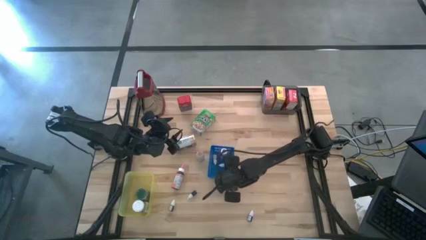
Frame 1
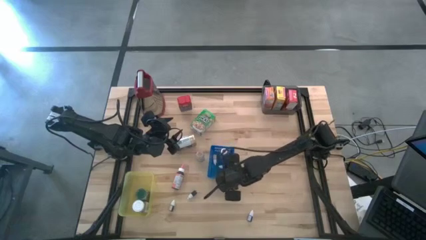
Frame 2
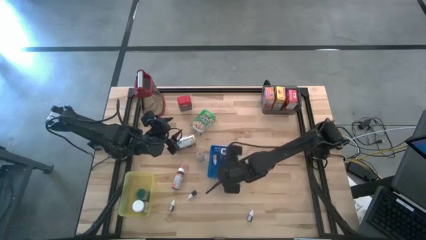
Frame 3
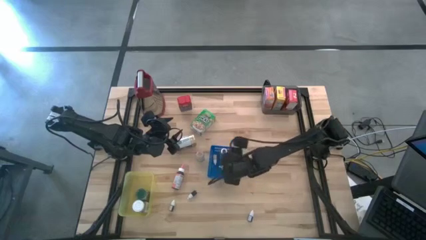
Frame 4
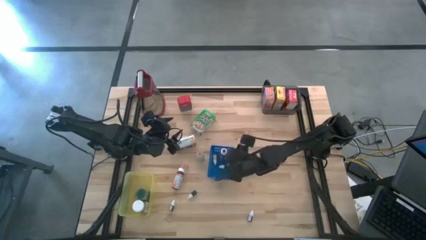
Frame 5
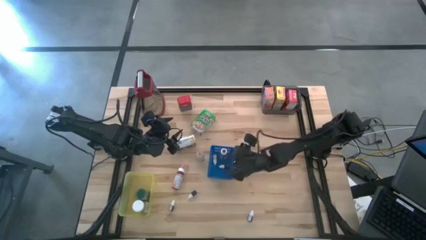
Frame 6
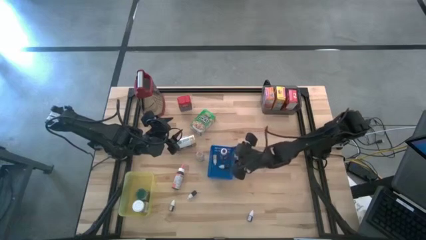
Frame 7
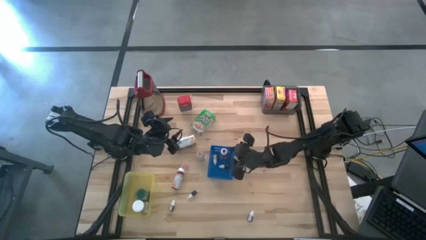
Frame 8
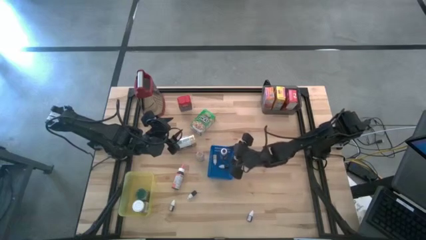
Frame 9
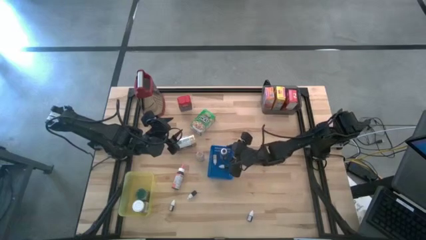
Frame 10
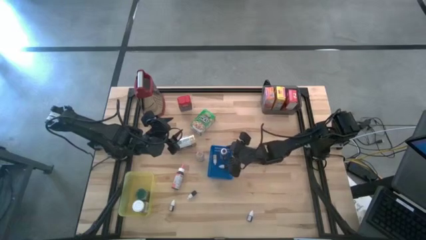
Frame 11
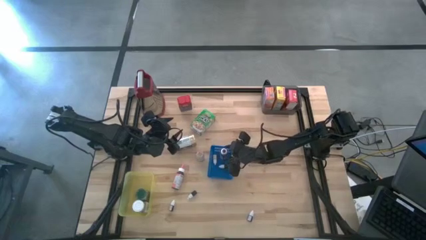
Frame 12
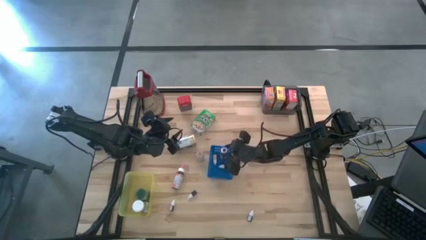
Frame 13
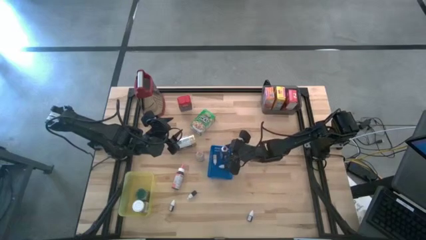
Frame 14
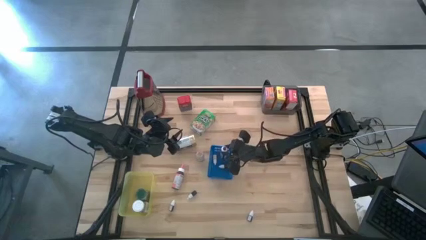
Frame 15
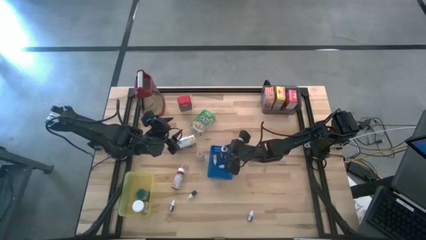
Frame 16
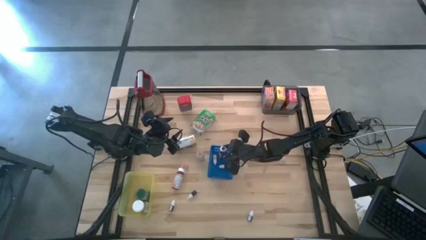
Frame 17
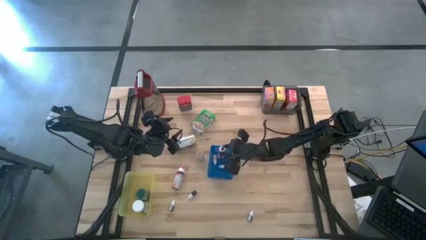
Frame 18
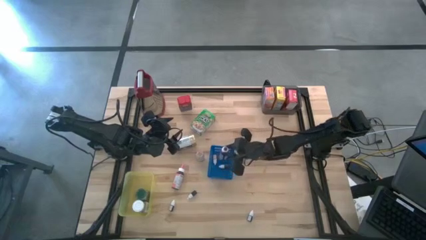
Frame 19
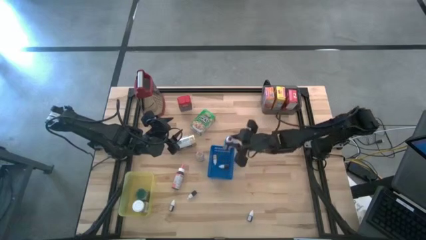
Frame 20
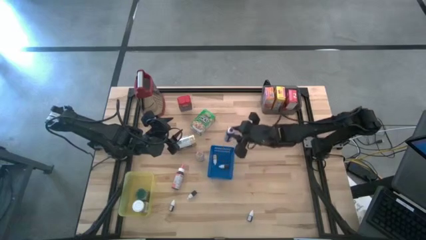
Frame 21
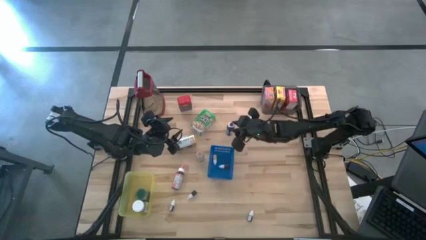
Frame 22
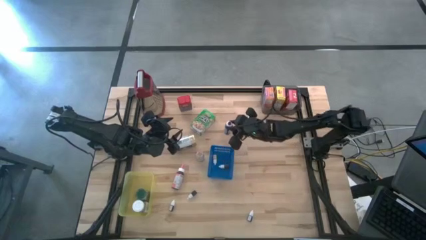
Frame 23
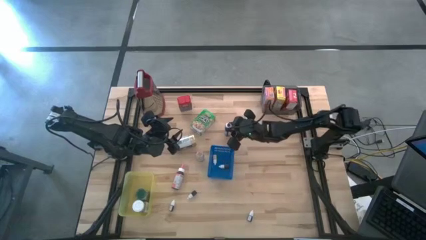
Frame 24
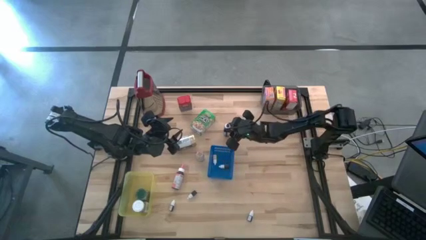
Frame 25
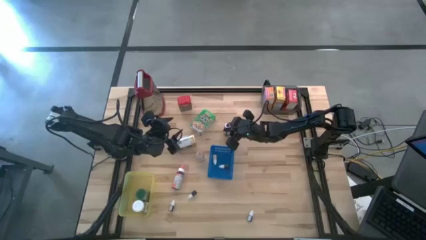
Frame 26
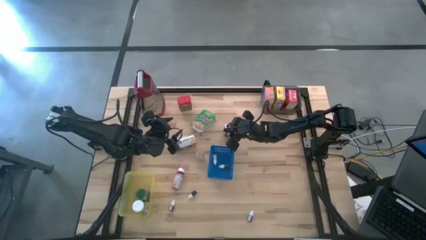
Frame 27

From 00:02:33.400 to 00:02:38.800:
Task: Pick & Place Kitchen Items
Remove the large purple food coloring bottle from the blue bin

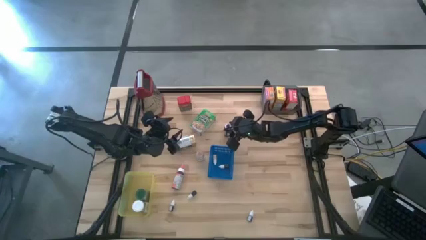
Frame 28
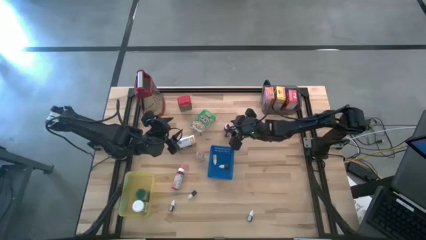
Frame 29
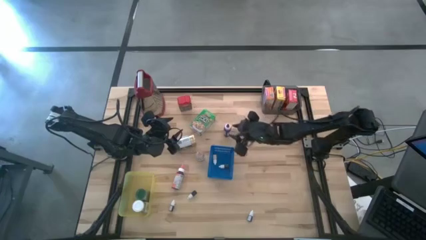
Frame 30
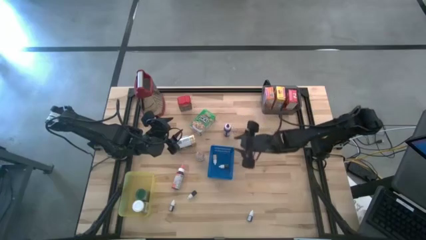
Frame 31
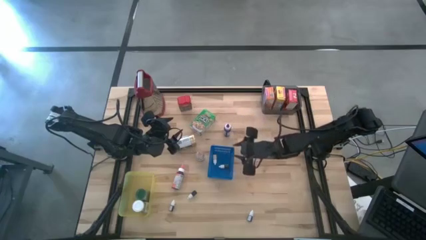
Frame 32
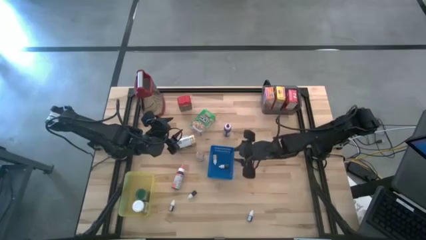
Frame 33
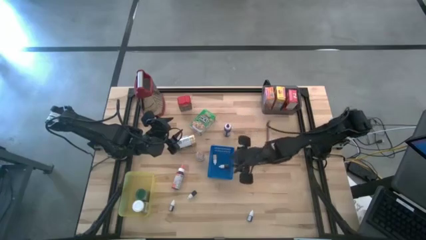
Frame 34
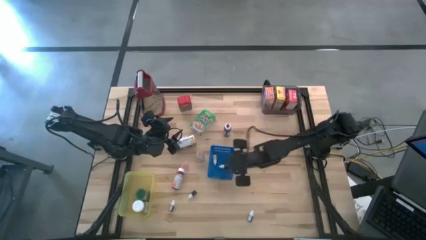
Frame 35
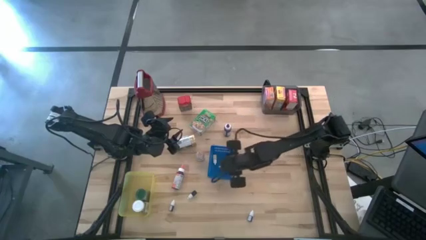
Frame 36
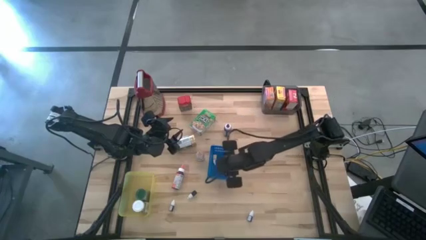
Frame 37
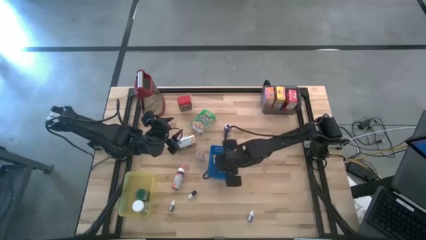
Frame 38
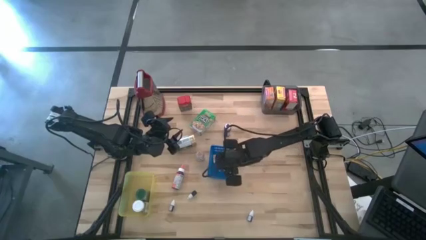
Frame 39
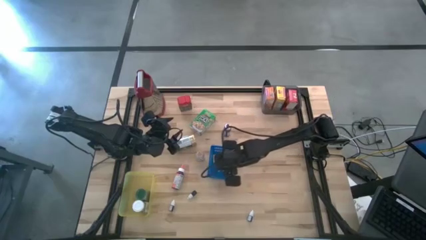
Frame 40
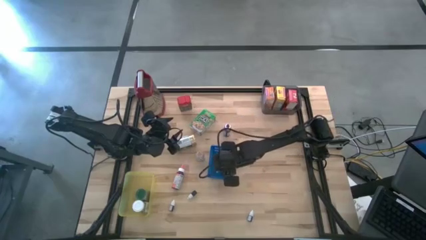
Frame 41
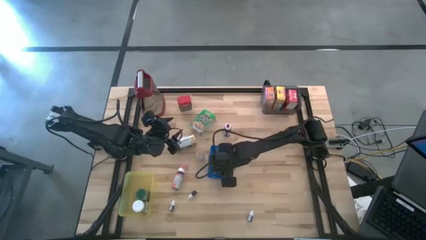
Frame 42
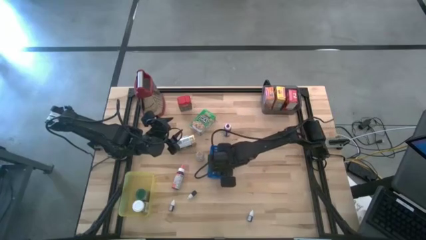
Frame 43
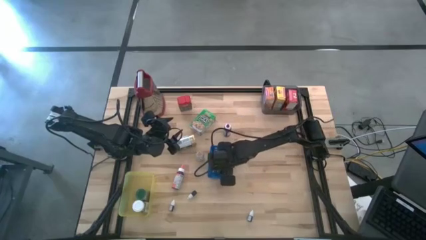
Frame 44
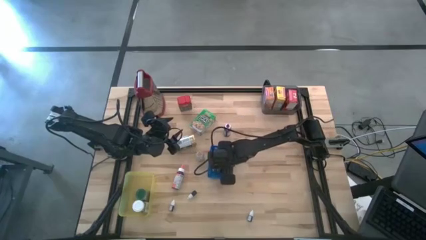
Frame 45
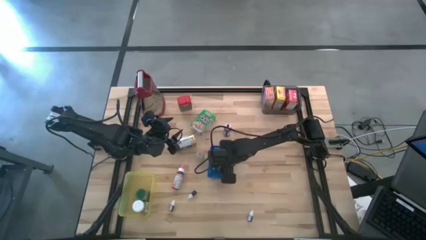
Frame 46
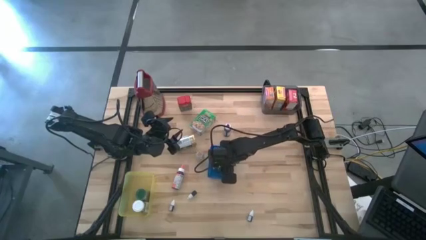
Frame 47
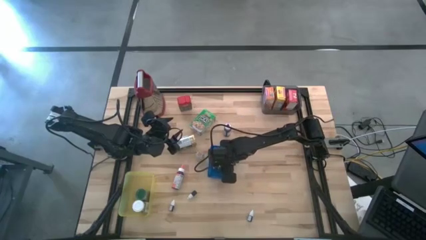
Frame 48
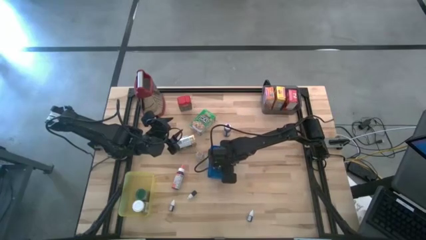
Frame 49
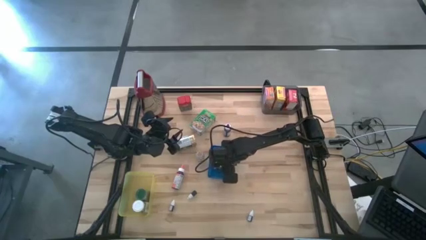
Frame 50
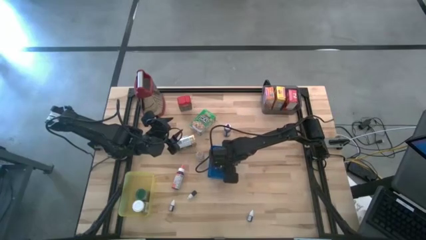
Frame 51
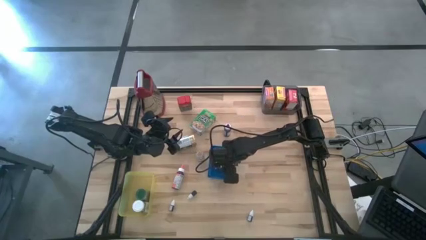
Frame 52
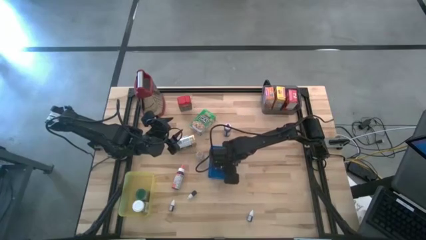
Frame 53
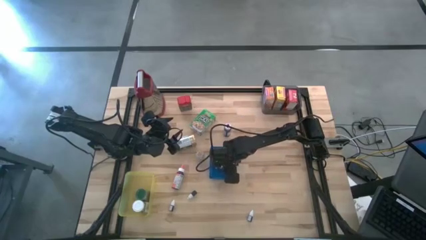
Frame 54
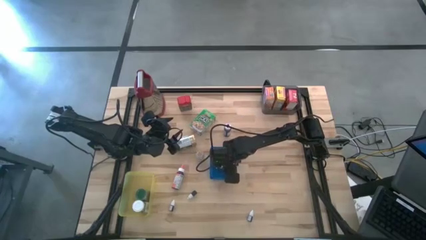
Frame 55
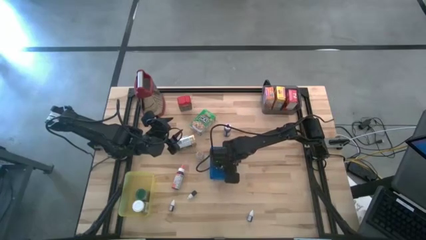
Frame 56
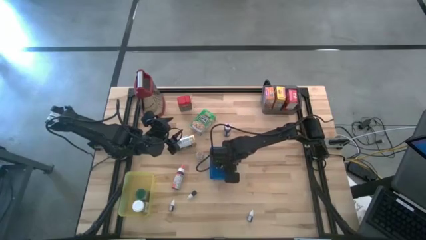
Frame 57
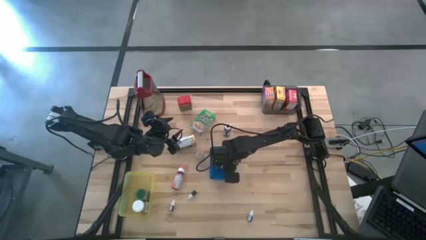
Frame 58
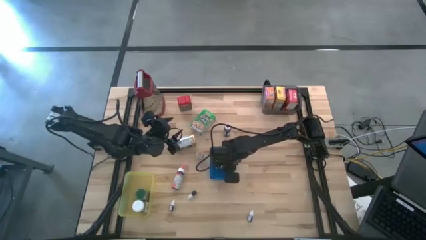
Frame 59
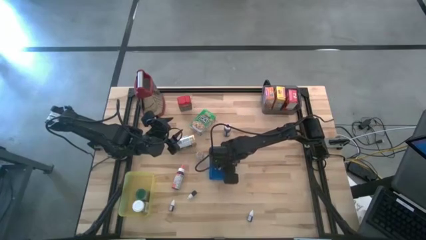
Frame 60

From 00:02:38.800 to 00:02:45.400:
Remove the small green food coloring bottle from the blue bin

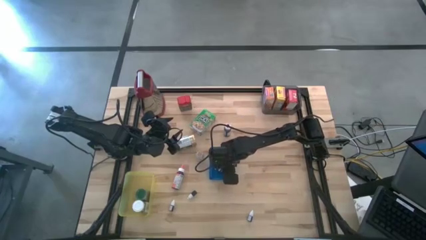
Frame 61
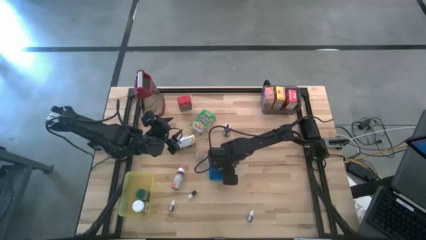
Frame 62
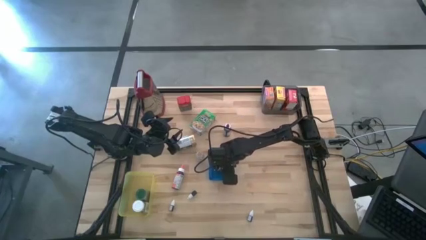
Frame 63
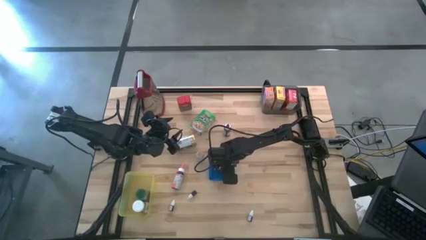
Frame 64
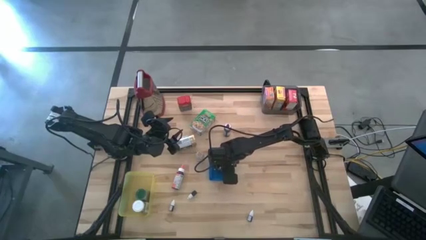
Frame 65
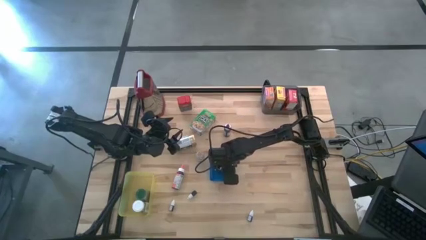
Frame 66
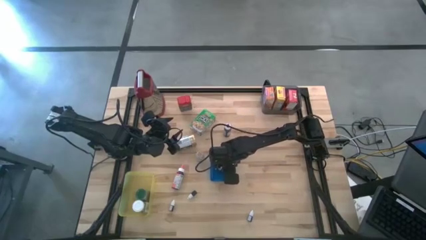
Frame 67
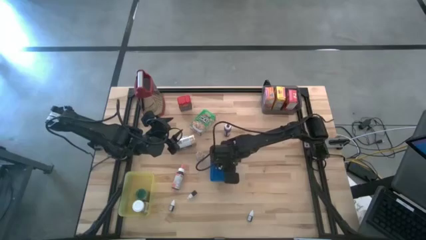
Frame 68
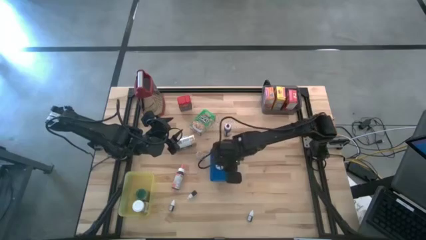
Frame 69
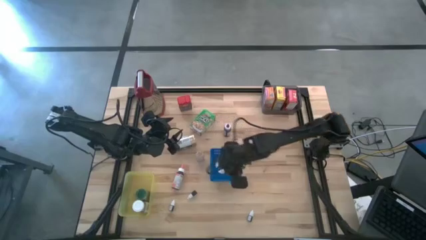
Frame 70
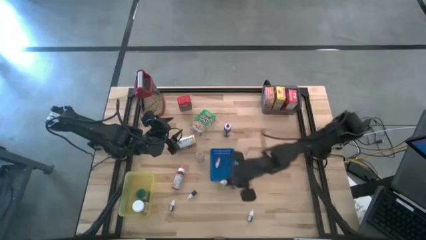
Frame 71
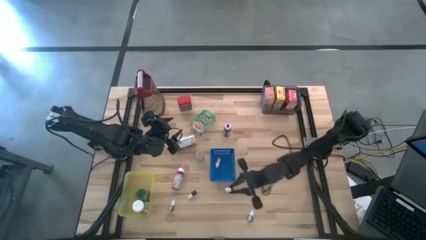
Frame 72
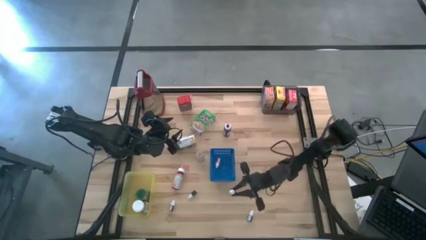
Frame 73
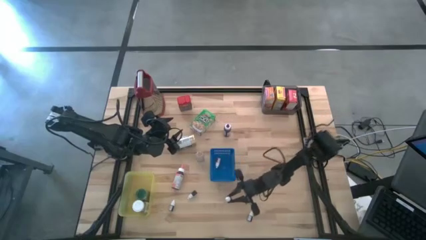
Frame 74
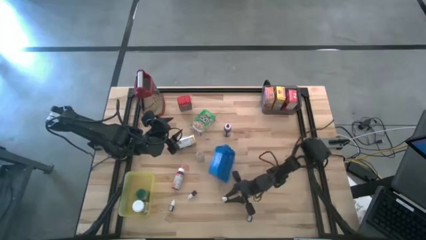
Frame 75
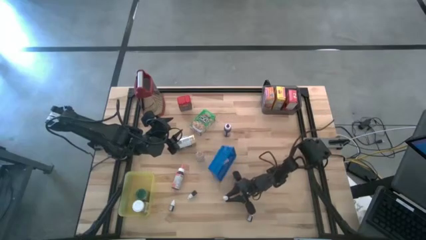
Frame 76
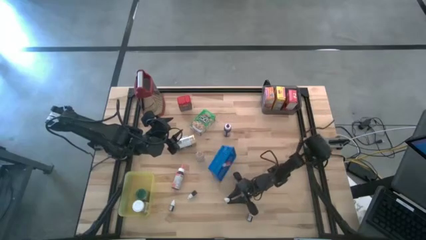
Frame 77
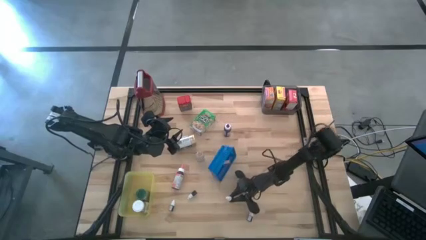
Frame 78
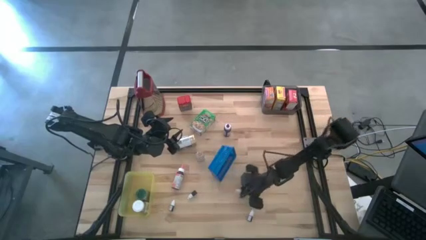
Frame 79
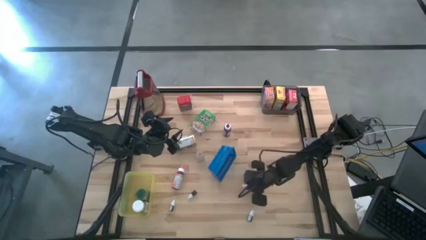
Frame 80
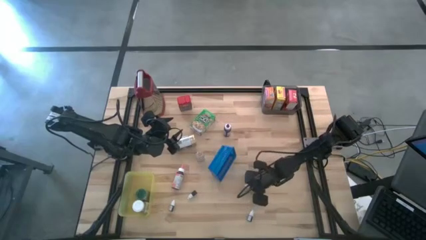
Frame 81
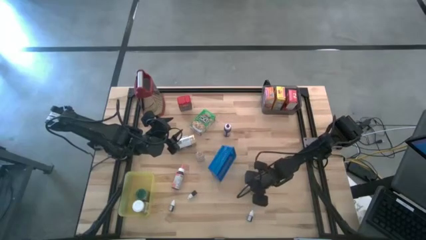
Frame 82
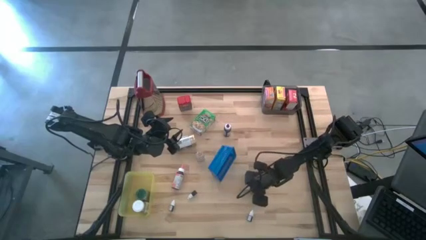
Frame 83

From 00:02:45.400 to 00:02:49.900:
Remove the small green food coloring bottle from the blue bin
